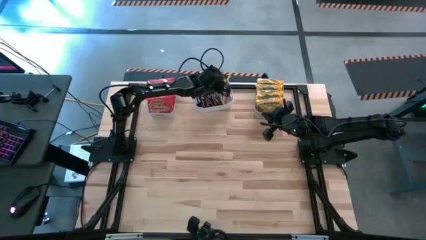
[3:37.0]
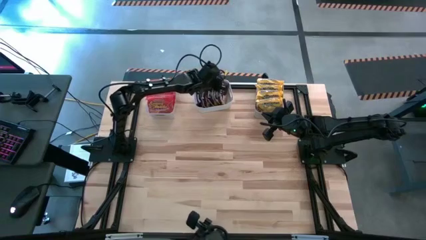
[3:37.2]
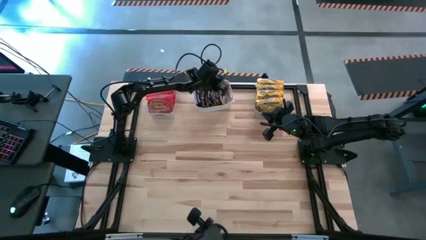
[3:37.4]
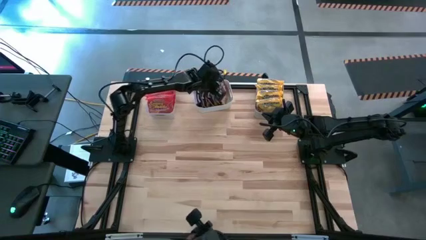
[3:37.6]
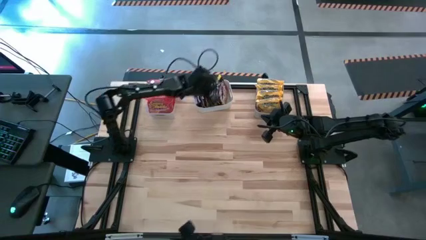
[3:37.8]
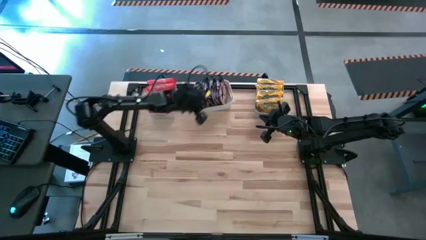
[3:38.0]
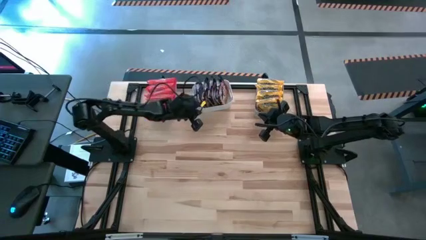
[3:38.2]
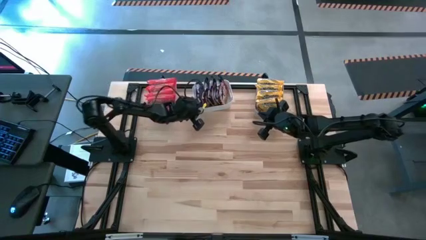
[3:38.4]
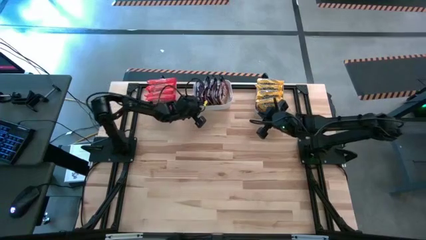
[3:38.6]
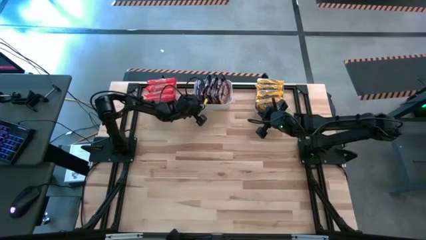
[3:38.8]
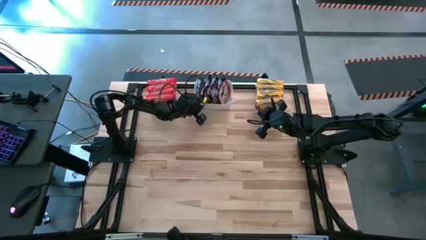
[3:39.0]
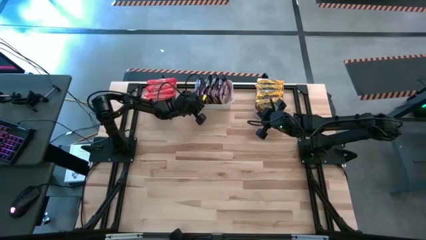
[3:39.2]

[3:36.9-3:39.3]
Task: Sort Maruchan noodles
Adjust the white bin

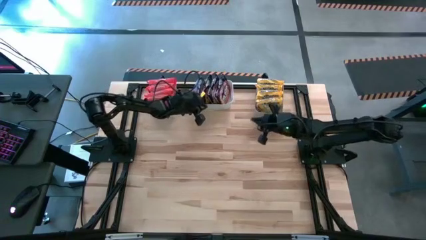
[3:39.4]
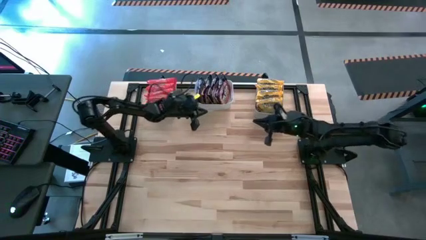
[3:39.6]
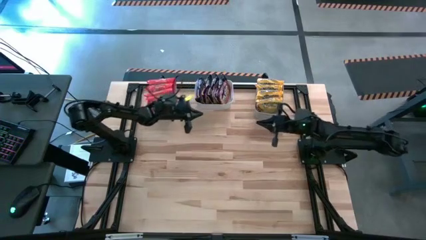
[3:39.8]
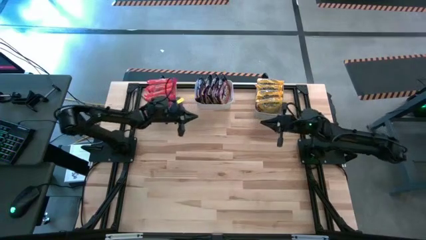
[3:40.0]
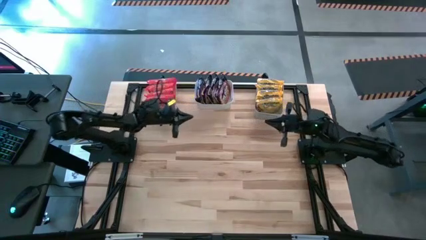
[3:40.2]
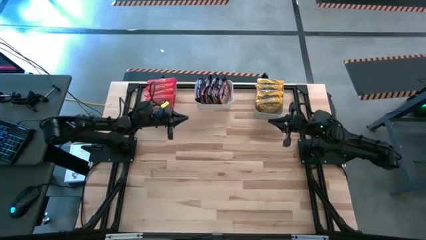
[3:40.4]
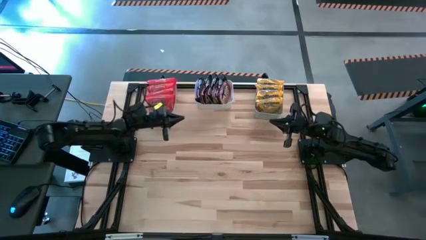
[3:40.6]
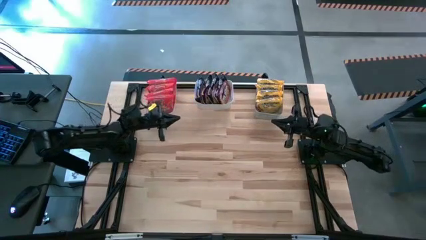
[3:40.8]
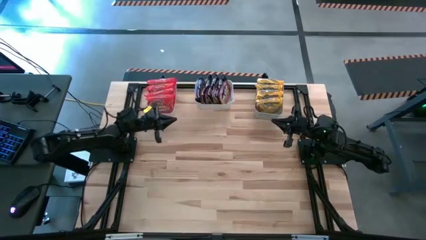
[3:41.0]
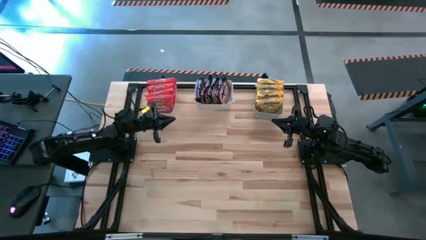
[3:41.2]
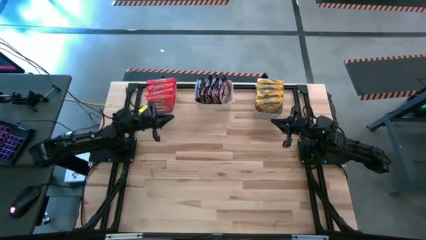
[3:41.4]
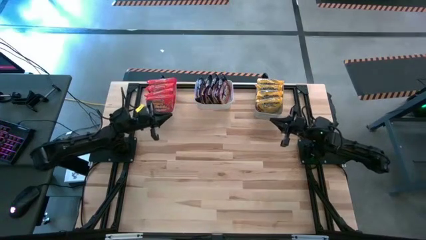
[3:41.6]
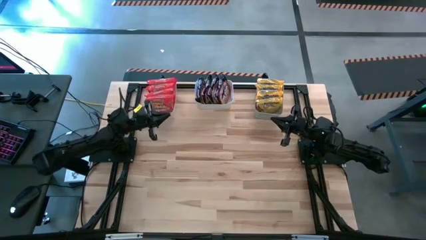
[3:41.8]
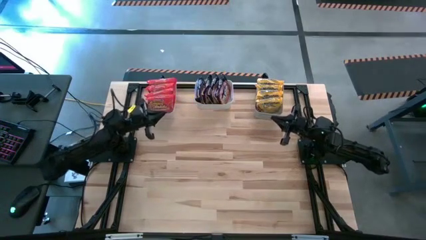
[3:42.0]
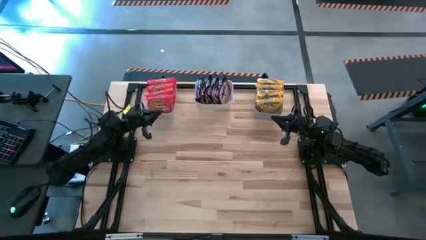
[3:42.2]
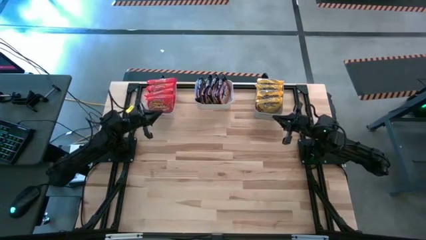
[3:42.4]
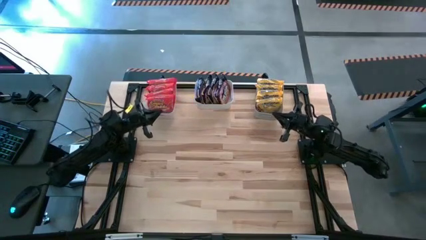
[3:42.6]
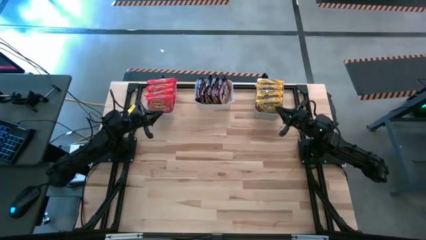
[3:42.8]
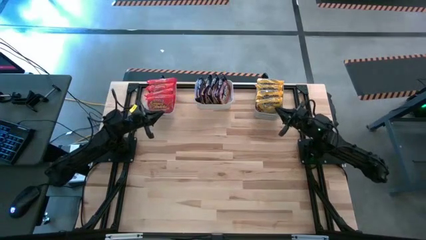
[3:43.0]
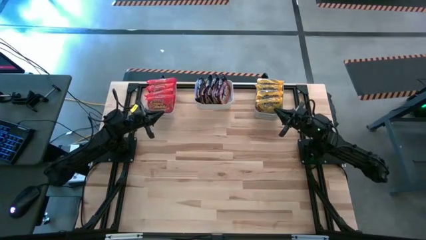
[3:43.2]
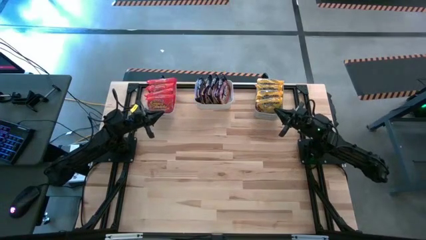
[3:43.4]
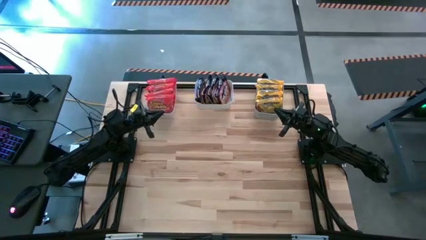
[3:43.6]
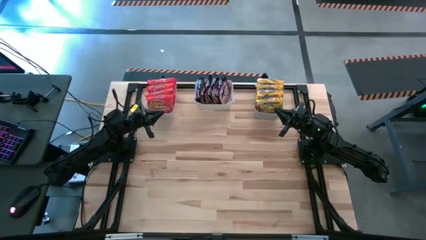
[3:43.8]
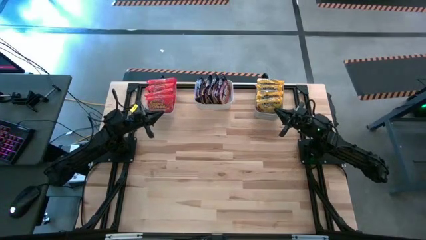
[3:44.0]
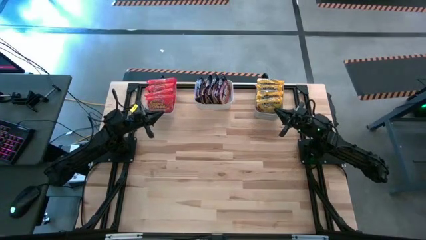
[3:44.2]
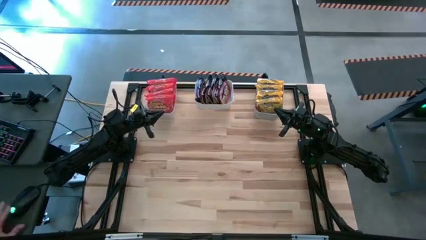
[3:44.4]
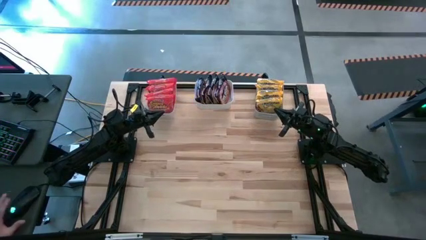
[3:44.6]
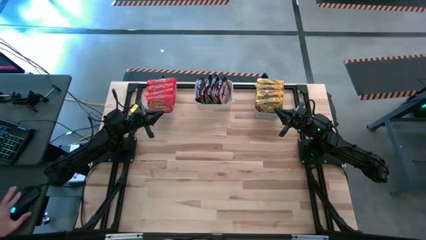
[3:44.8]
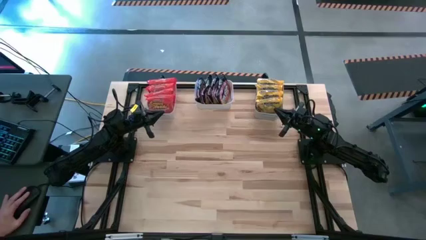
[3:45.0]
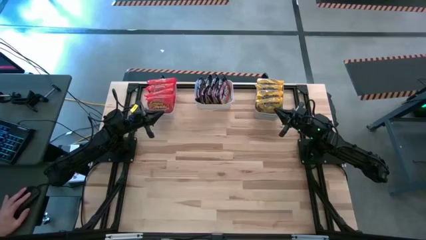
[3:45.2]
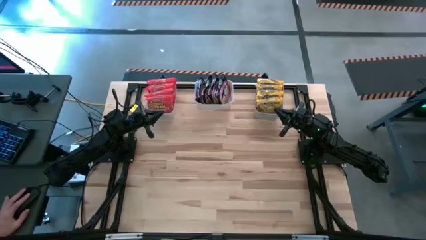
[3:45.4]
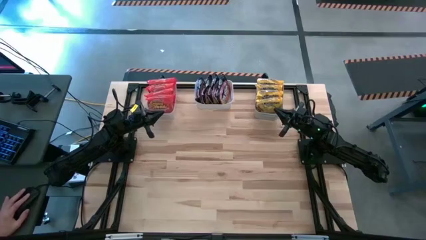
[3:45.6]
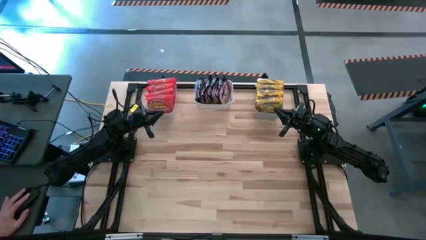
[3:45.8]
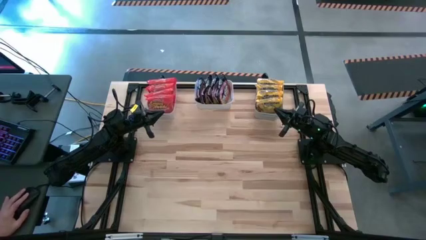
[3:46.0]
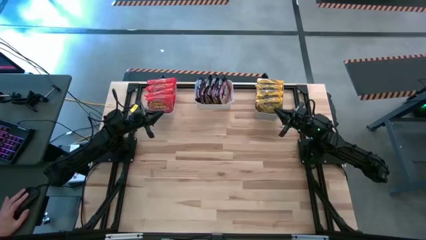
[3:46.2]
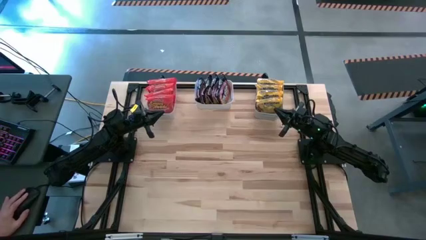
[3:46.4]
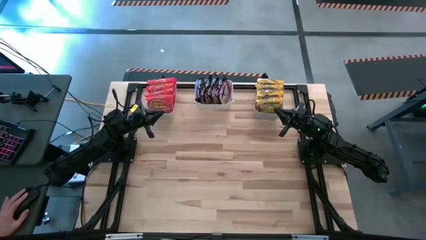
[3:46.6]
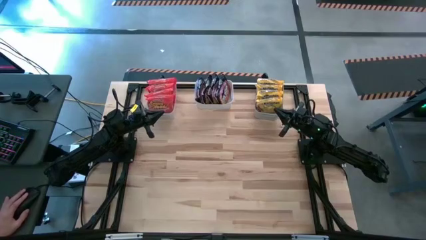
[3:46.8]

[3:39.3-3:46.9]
Return to Home Position

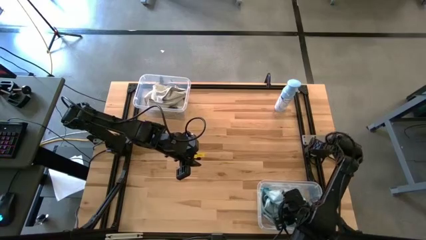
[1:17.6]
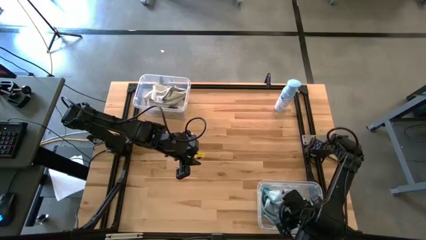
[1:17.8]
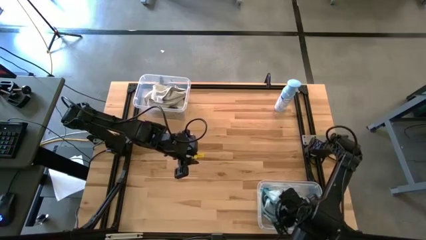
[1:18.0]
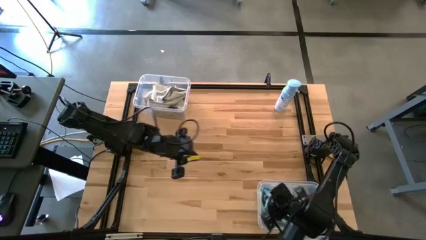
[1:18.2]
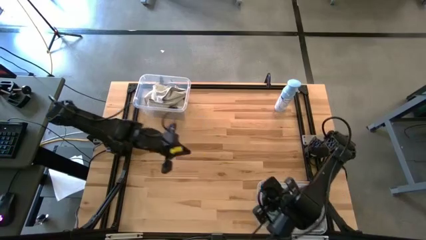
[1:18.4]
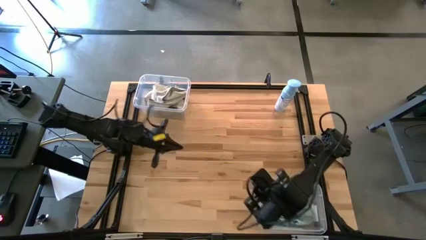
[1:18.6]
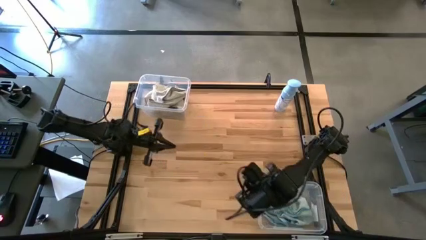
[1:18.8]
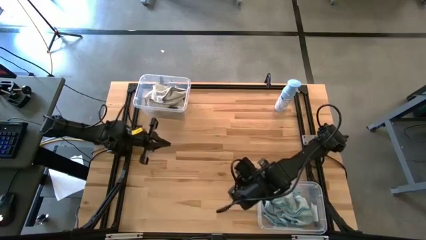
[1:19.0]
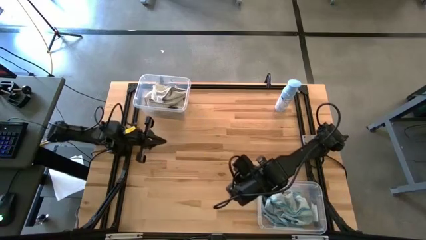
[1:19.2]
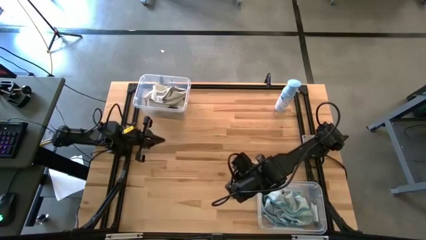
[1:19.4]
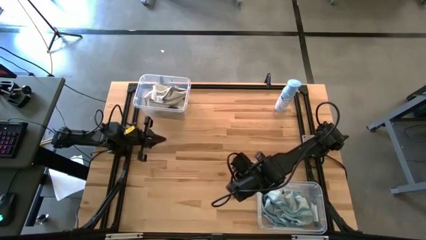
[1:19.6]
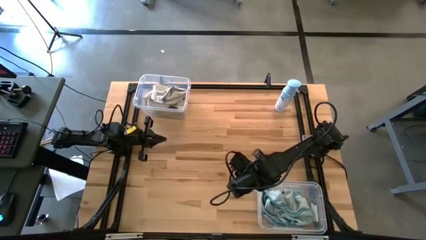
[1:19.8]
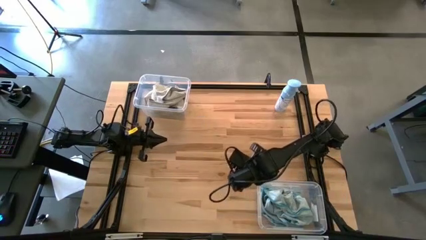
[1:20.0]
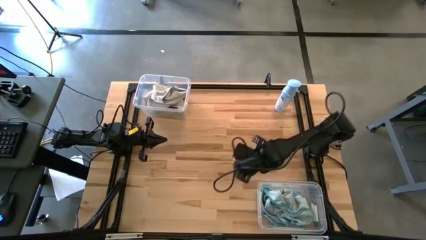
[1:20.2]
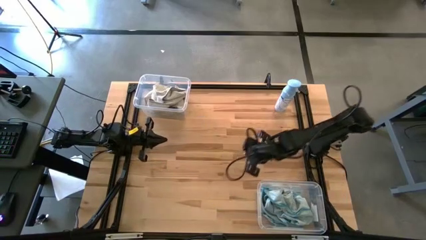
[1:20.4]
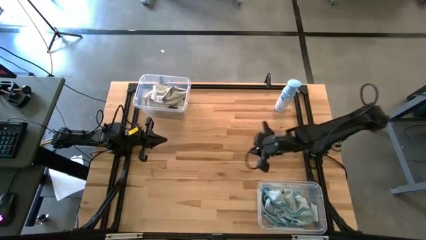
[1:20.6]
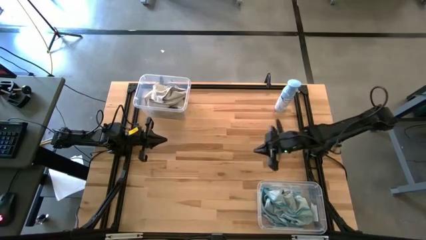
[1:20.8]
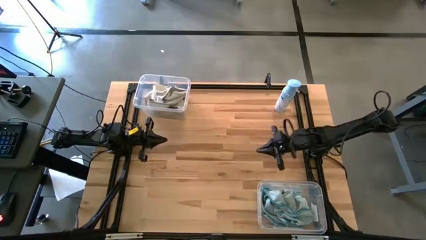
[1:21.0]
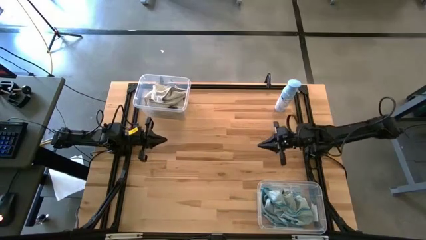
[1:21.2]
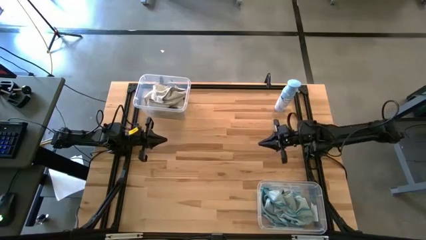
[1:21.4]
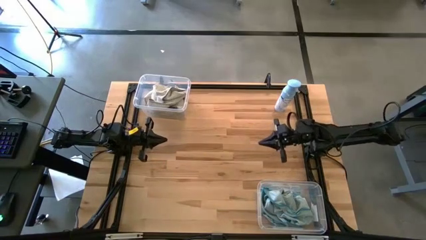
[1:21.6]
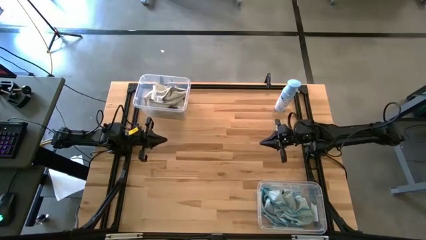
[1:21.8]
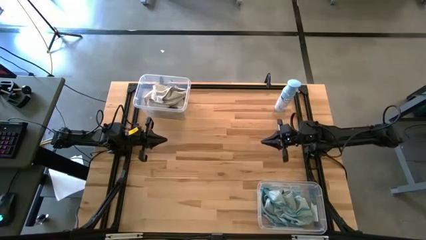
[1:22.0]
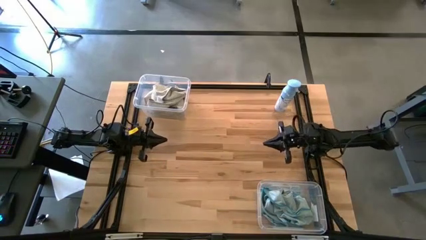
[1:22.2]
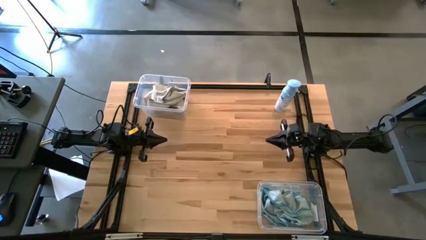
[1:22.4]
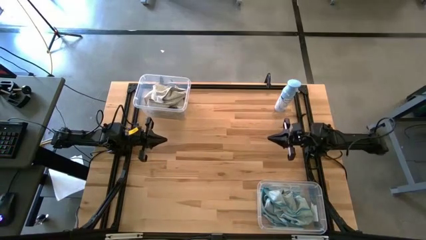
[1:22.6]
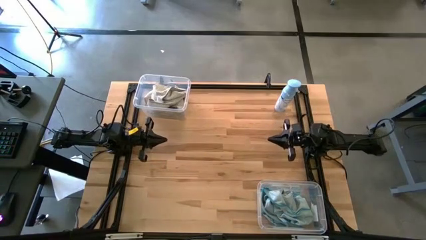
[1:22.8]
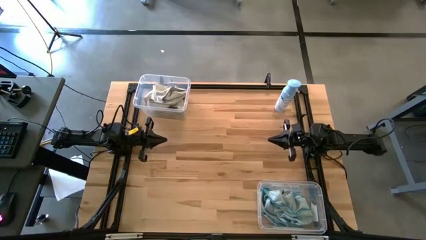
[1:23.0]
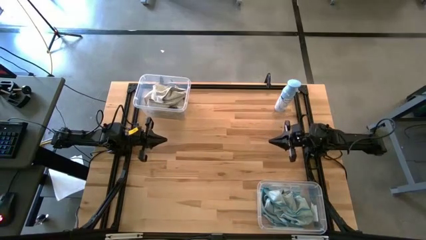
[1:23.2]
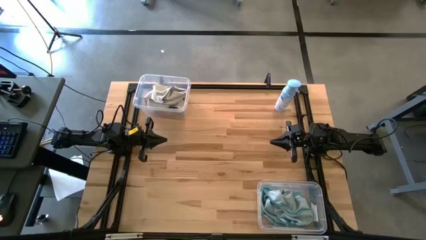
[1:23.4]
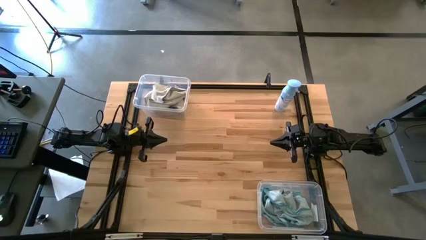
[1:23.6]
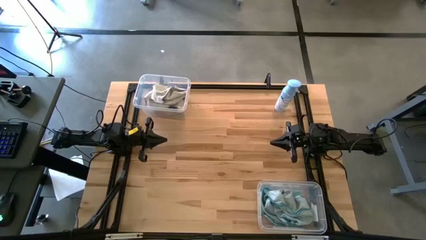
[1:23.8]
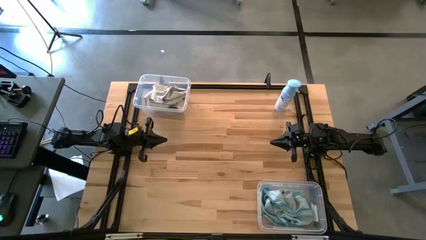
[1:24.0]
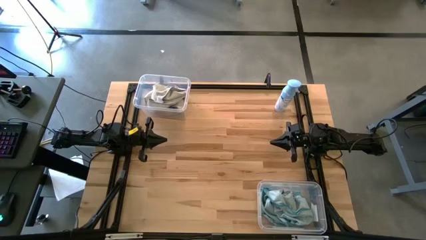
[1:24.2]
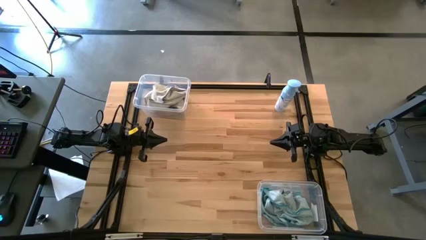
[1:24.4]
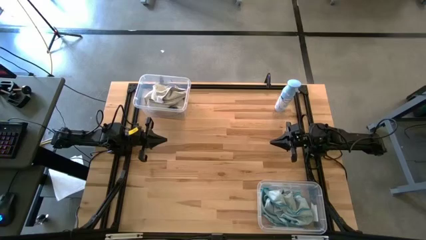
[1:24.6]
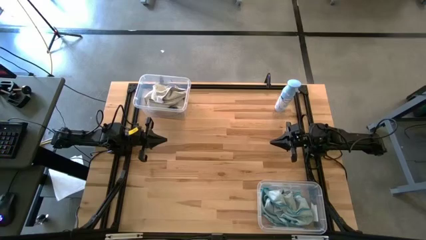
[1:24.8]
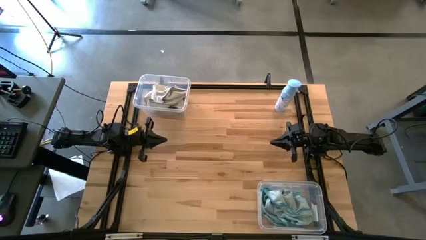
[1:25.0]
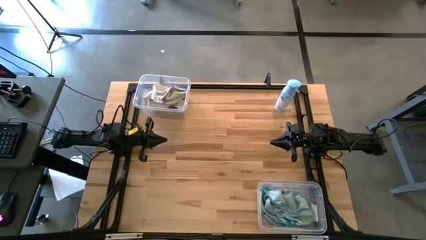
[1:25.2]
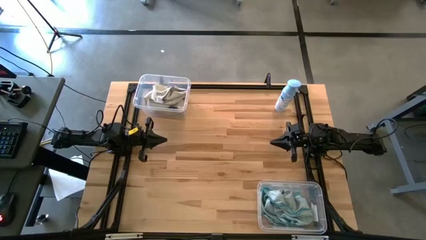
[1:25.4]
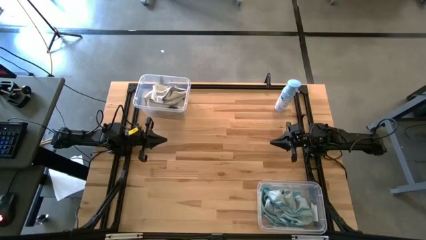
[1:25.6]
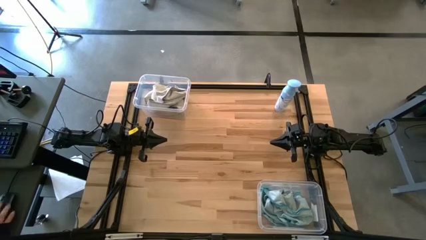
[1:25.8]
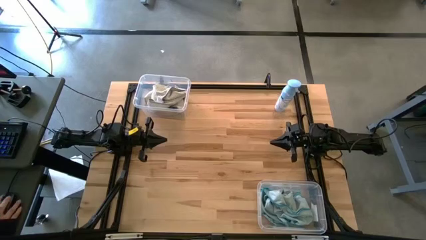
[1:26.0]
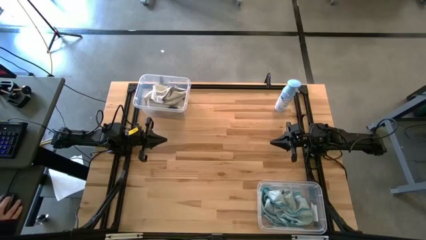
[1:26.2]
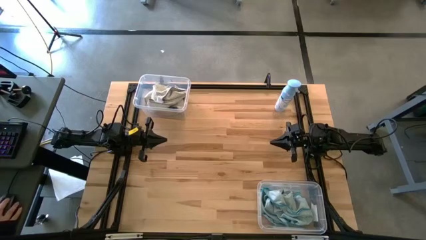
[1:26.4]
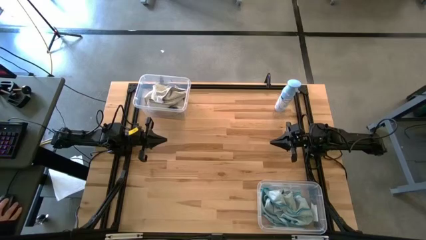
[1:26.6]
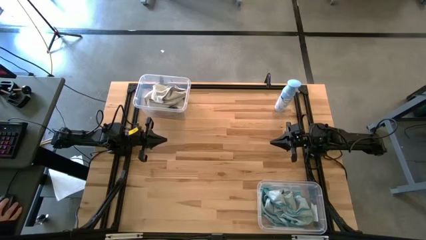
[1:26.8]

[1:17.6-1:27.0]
Task: Sort microfiber towel by color & place in baskets
Return to Home Position
